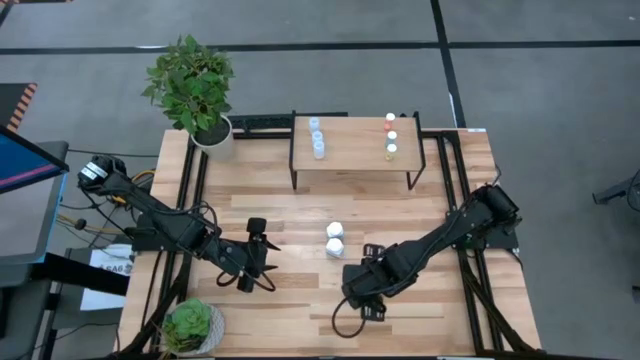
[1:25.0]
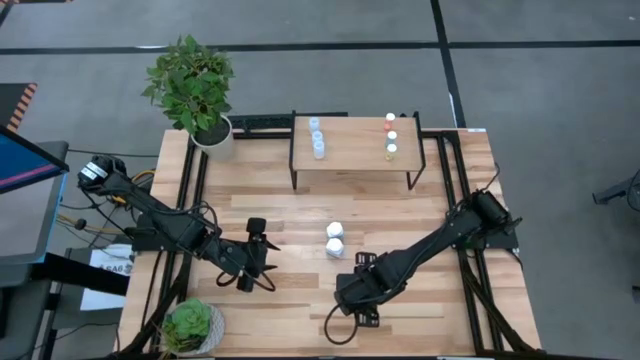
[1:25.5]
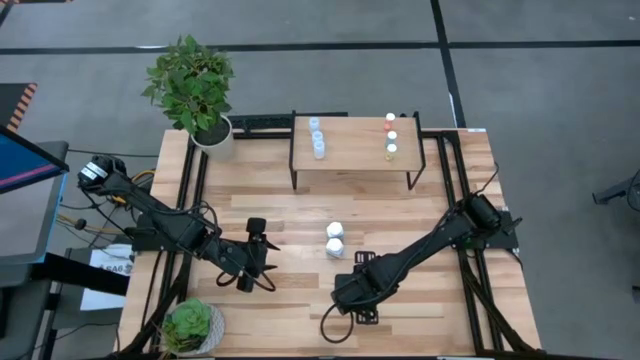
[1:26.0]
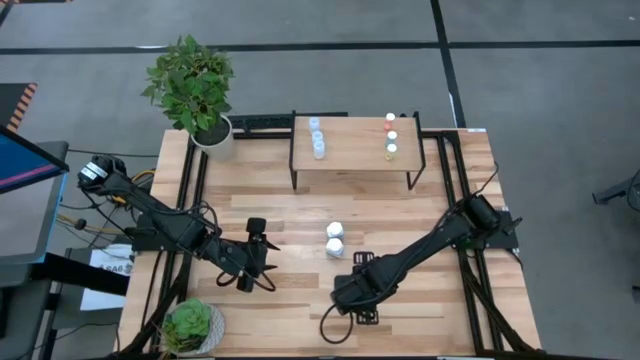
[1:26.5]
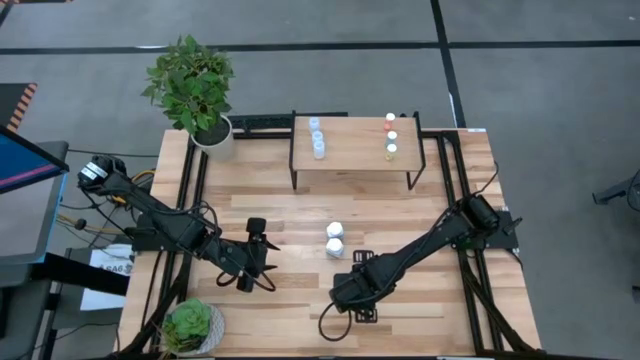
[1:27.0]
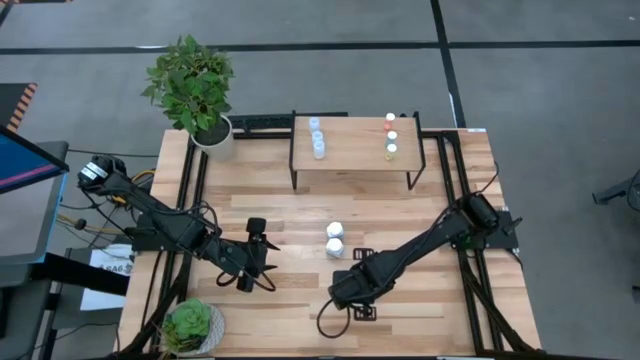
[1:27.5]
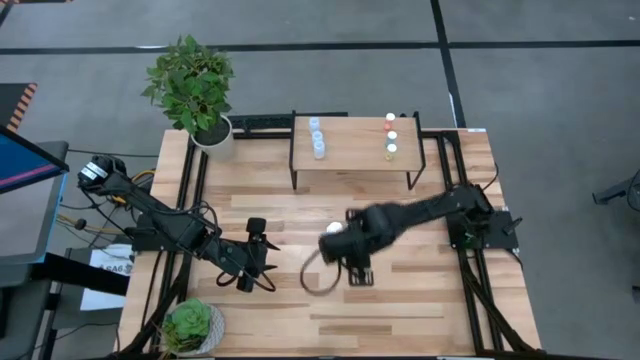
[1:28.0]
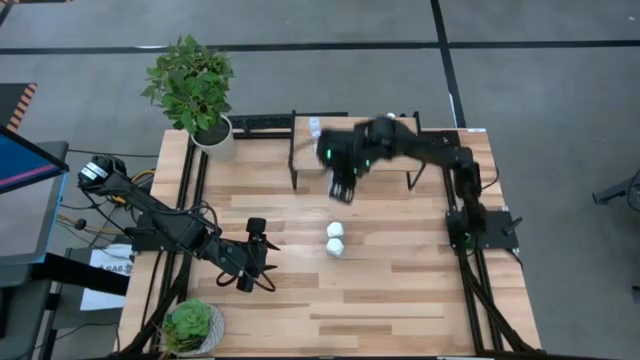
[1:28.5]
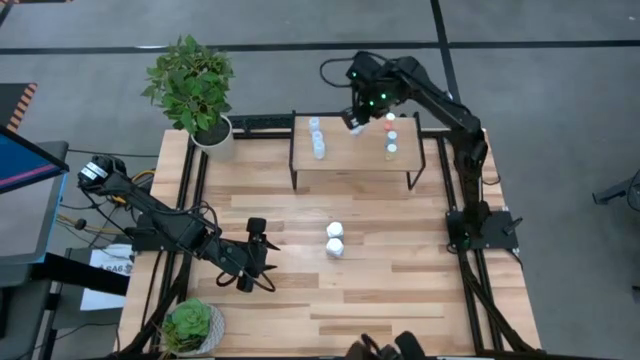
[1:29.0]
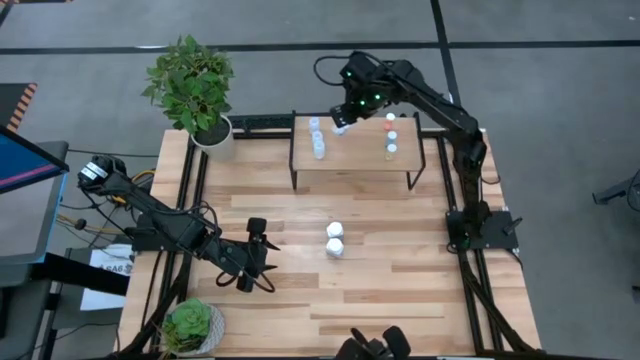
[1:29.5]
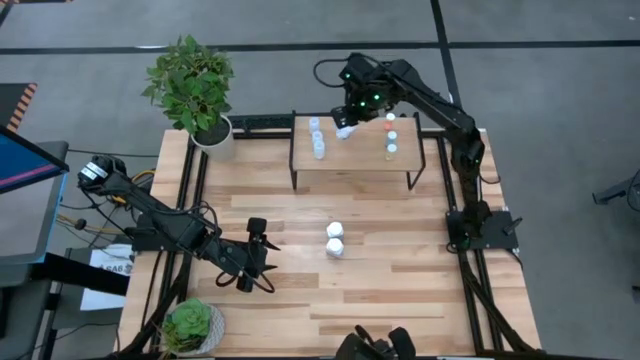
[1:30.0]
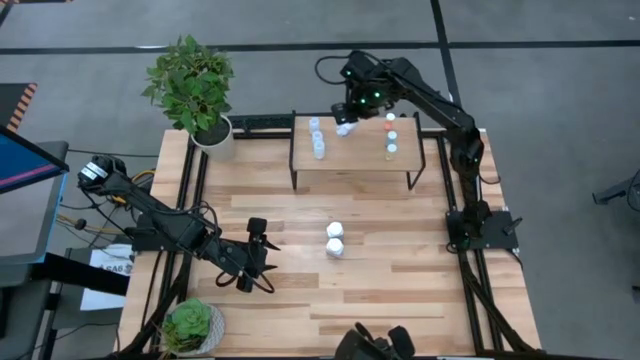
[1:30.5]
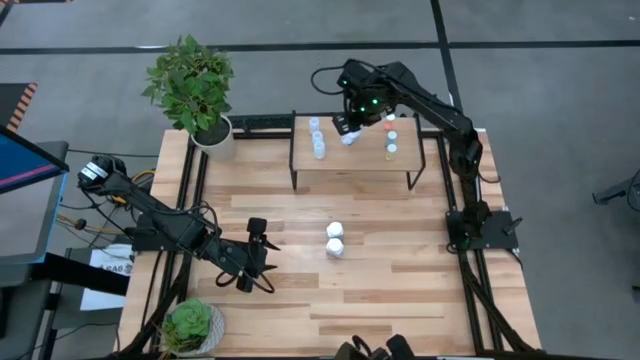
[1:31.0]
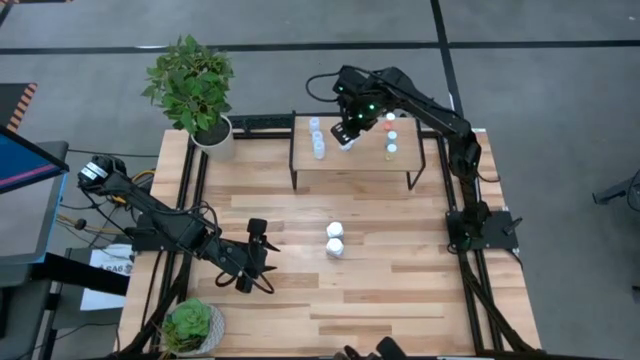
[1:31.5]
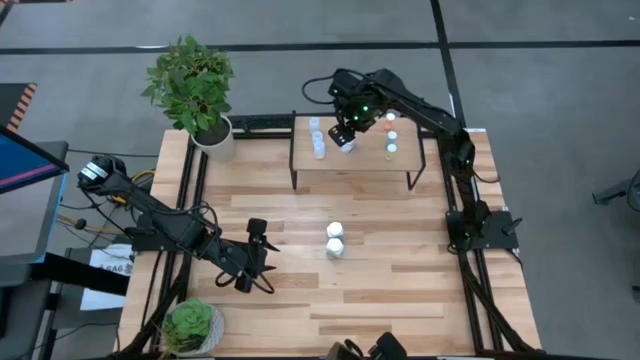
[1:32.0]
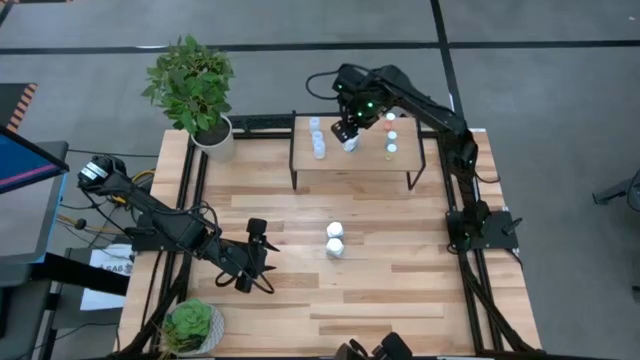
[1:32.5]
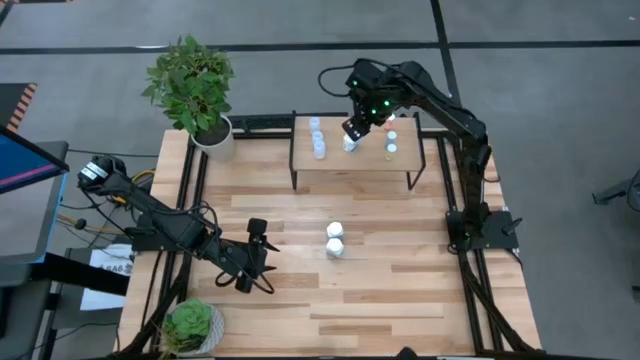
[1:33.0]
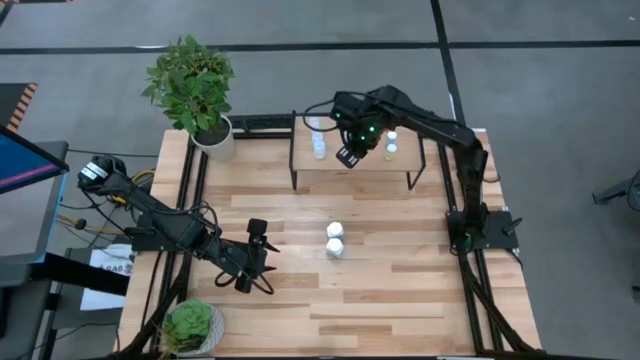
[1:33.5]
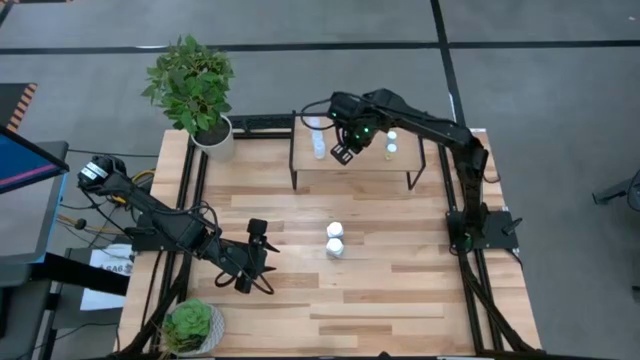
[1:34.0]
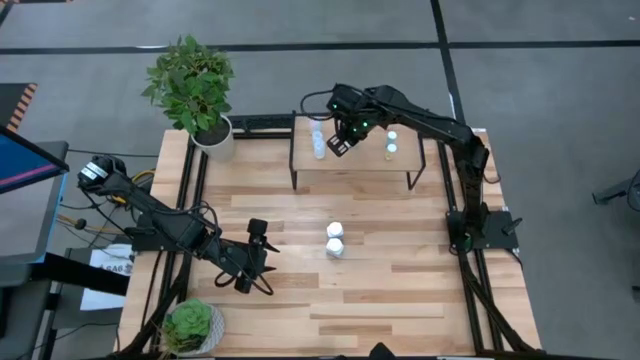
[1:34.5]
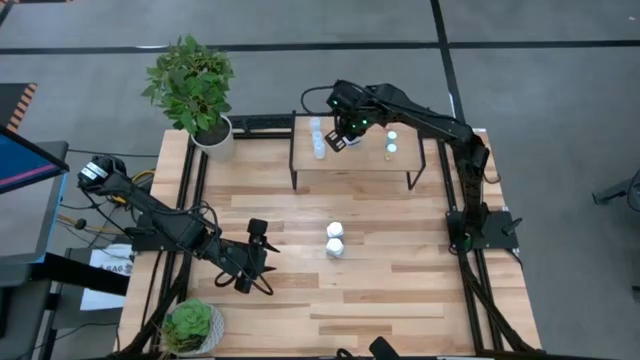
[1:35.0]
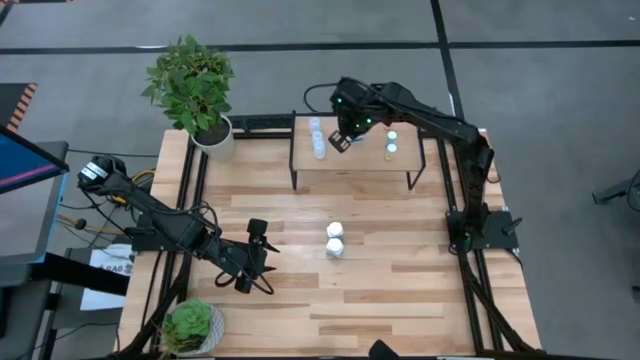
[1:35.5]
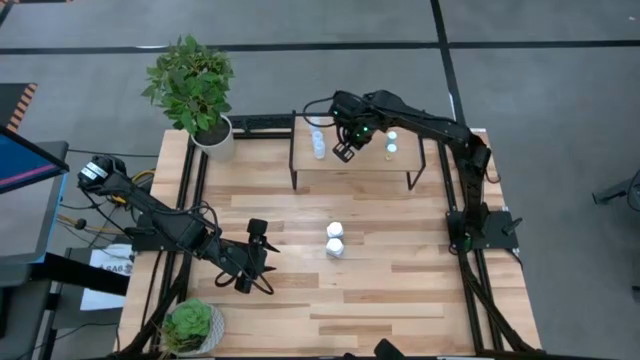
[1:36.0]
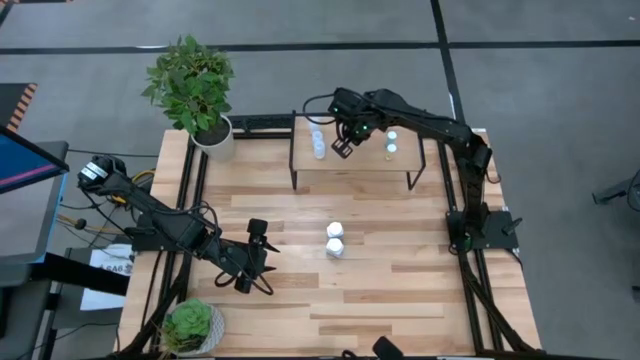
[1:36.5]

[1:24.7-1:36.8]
Task: Pick and place medicine bottles onto shelf by color
Put the bottom white pill bottle on the shelf

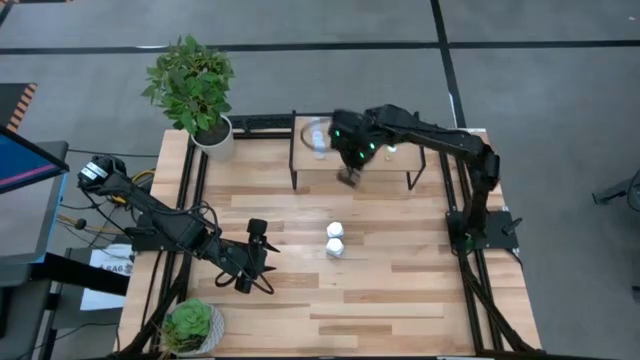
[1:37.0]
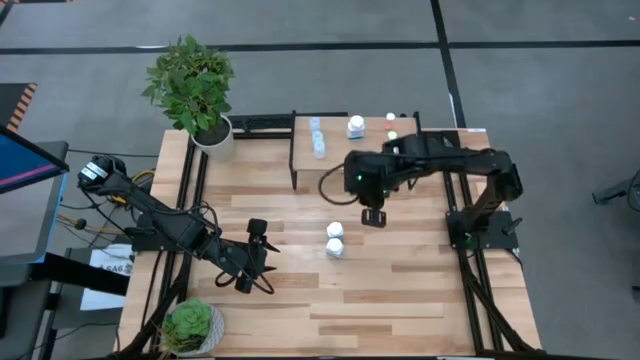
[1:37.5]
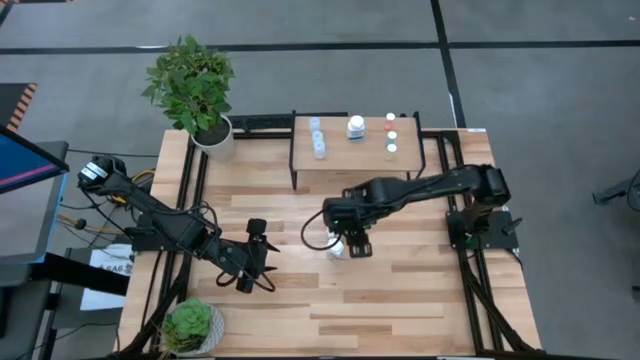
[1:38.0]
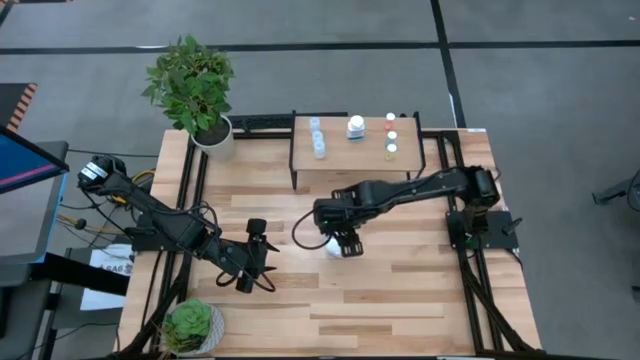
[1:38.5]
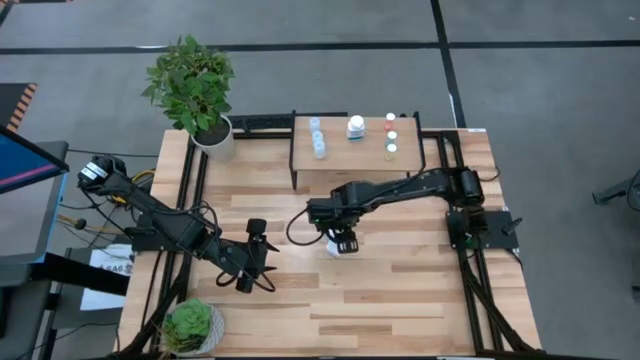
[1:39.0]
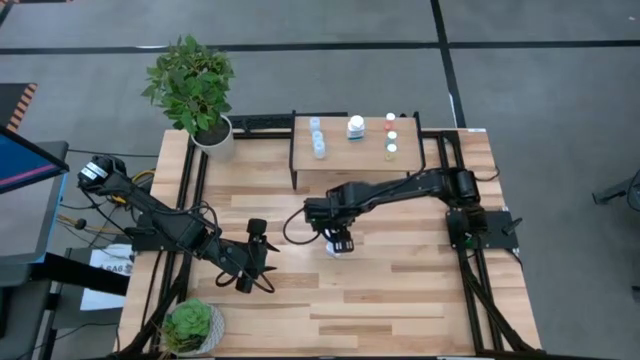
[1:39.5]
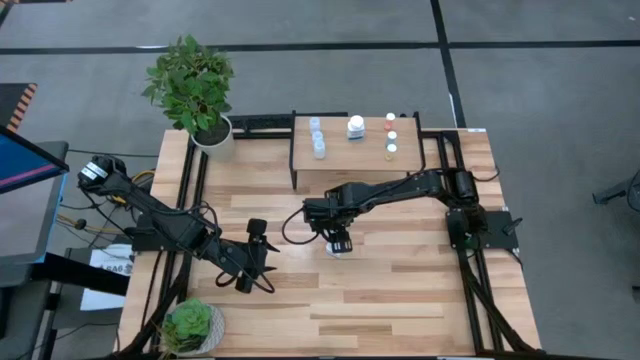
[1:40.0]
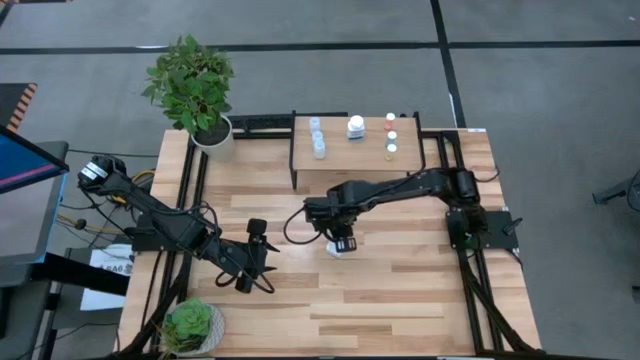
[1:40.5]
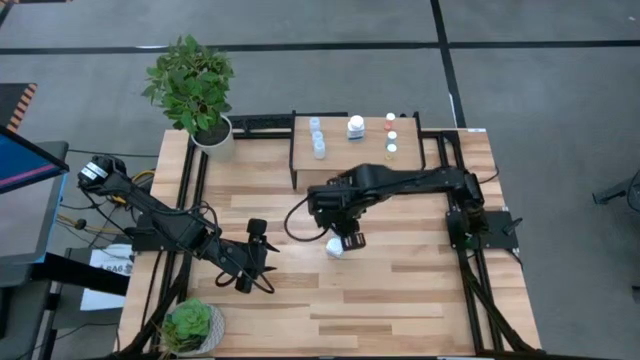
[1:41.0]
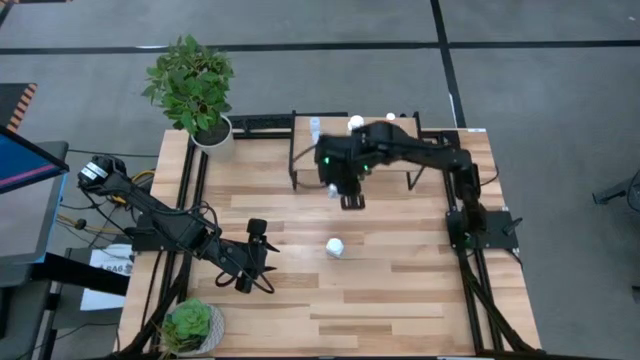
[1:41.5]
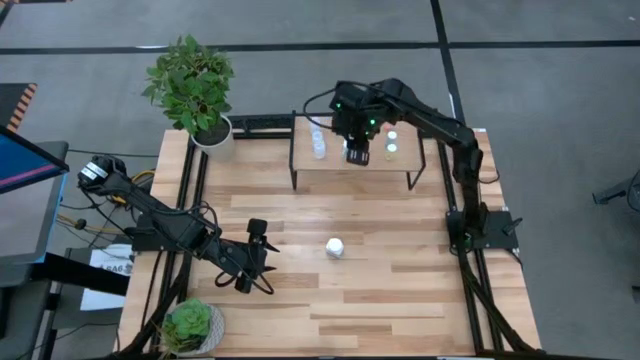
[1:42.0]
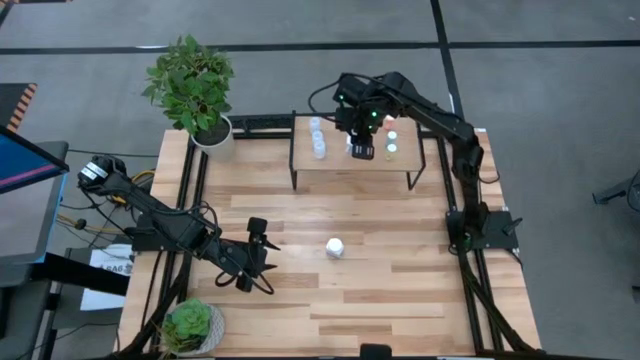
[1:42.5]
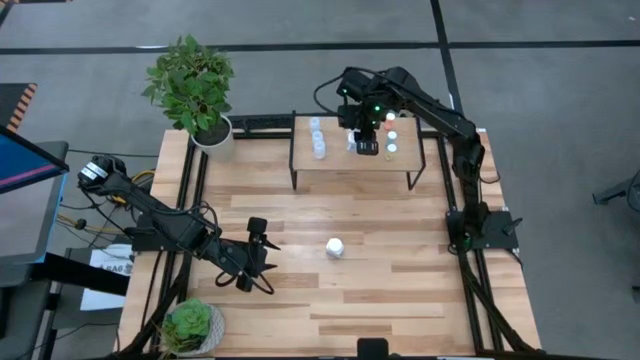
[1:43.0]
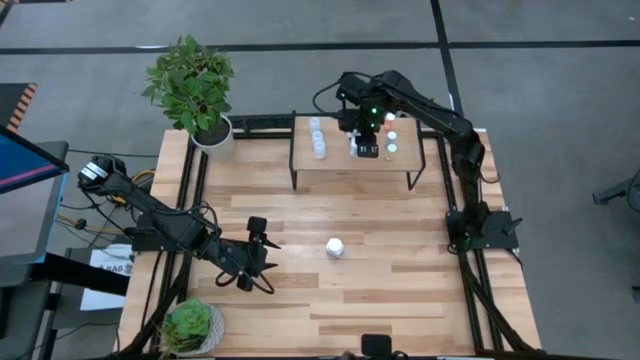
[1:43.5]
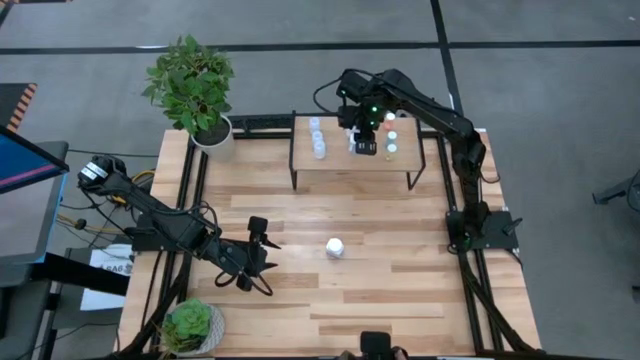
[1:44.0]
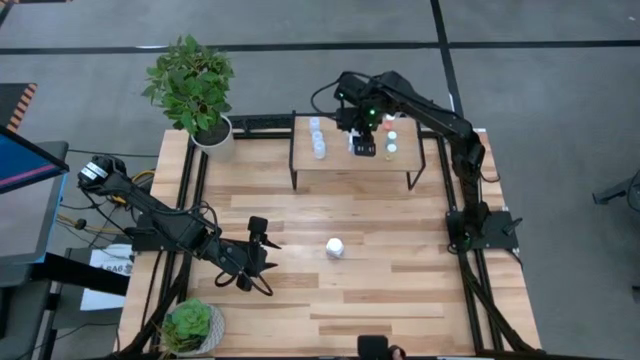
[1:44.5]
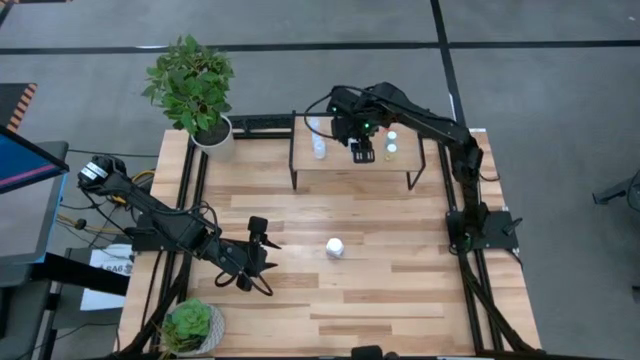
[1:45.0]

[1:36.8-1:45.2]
Put the top white pill bottle on the shelf aligned with the other white pill bottle

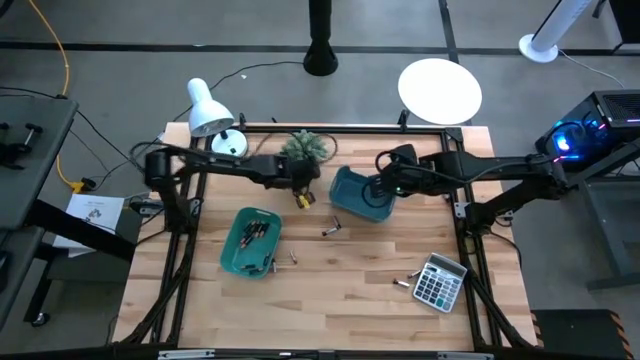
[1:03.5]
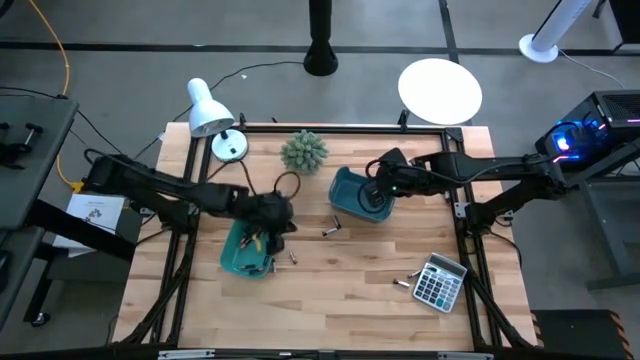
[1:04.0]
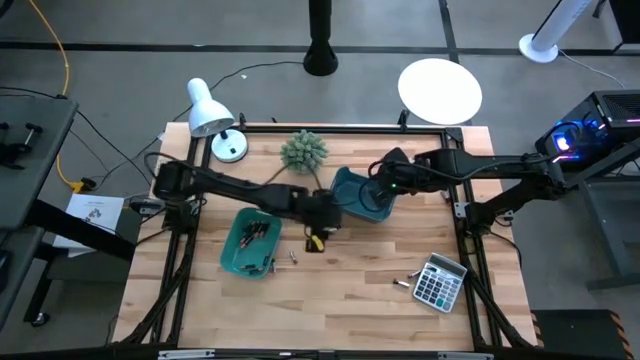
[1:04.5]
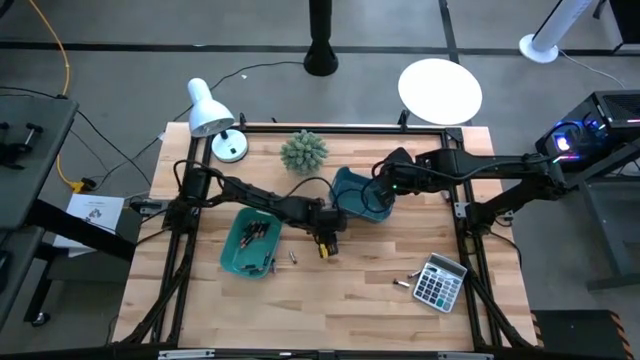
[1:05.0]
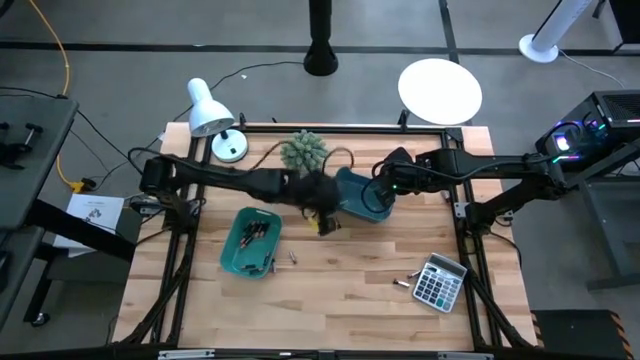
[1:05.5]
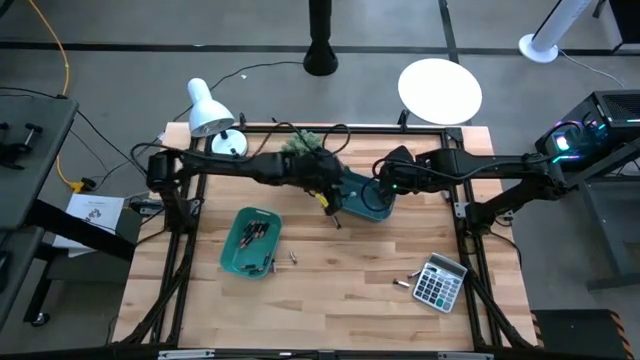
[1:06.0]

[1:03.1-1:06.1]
Task: Sort batteries
Put the silver battery into the blue bin
